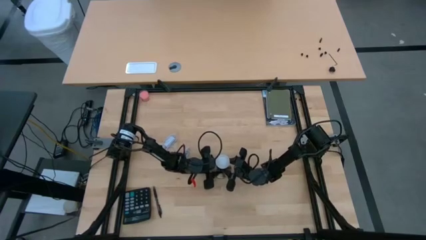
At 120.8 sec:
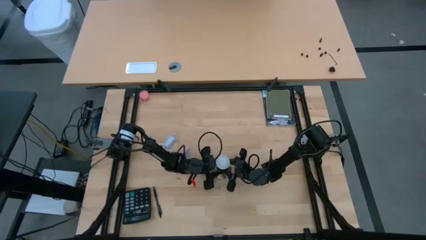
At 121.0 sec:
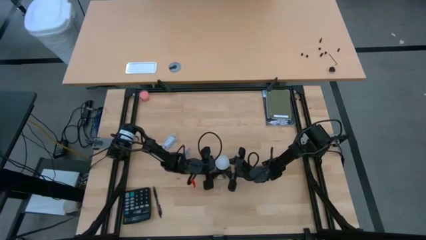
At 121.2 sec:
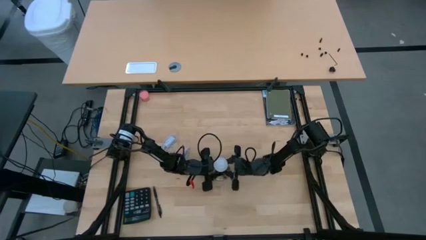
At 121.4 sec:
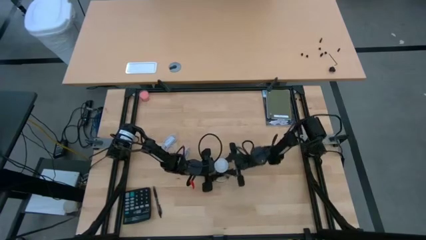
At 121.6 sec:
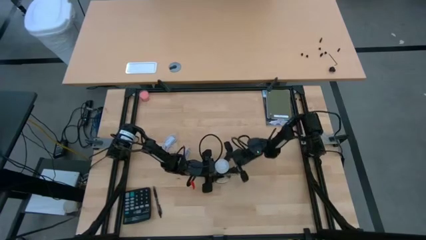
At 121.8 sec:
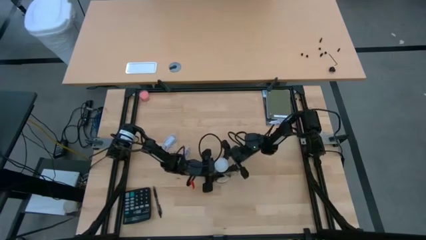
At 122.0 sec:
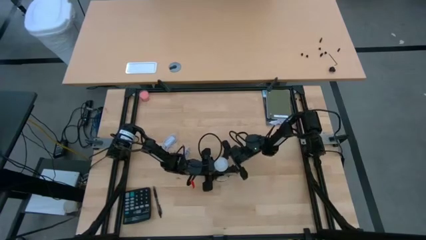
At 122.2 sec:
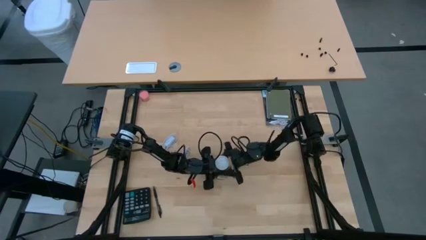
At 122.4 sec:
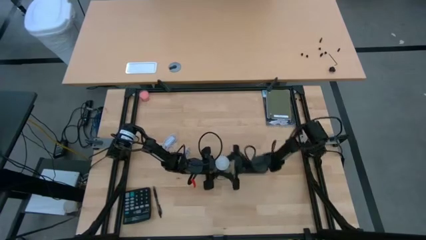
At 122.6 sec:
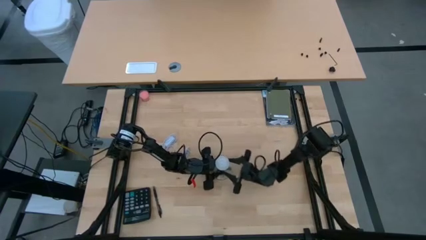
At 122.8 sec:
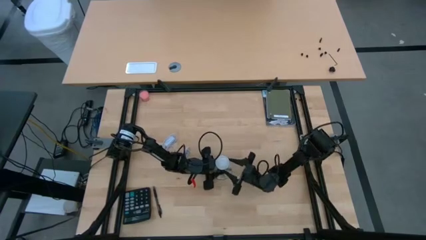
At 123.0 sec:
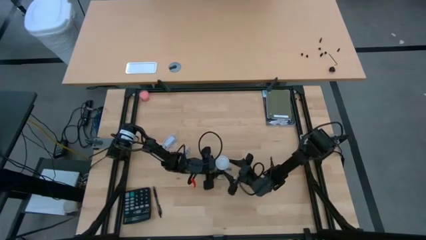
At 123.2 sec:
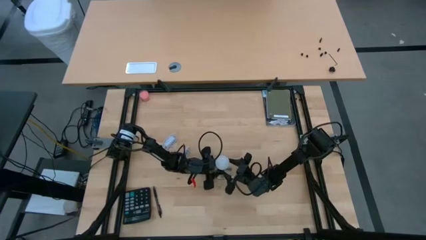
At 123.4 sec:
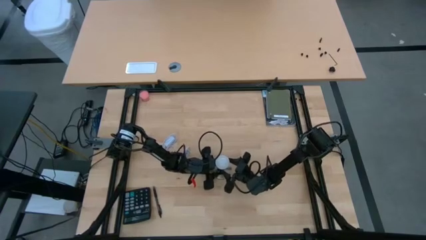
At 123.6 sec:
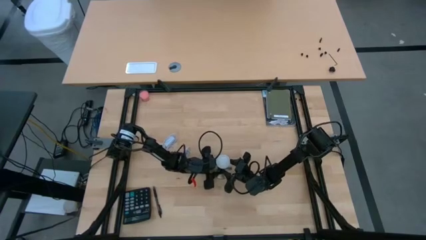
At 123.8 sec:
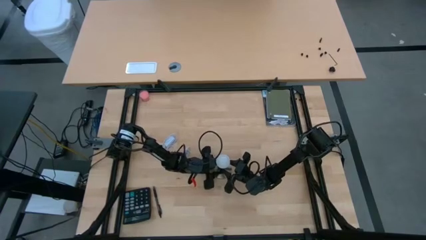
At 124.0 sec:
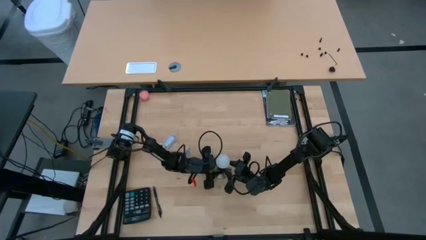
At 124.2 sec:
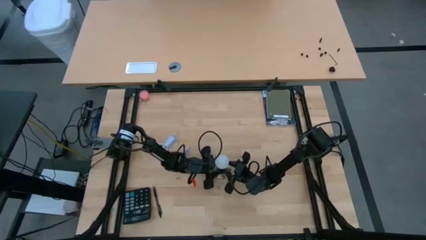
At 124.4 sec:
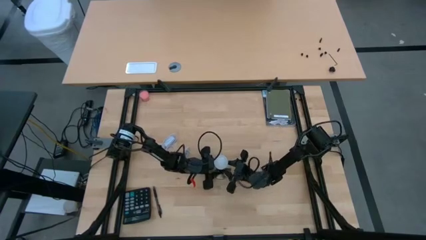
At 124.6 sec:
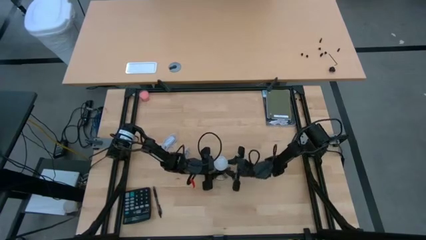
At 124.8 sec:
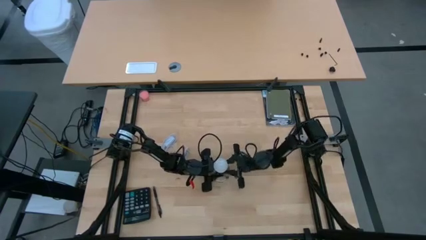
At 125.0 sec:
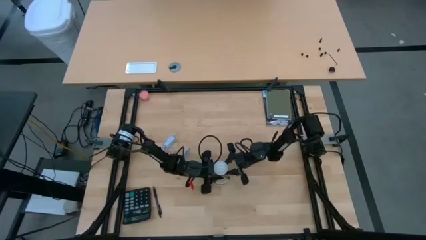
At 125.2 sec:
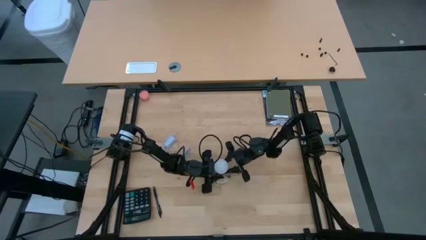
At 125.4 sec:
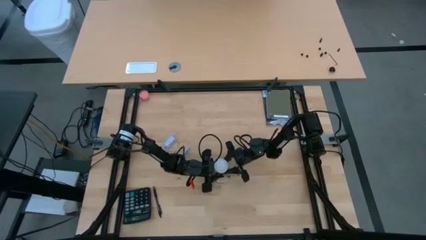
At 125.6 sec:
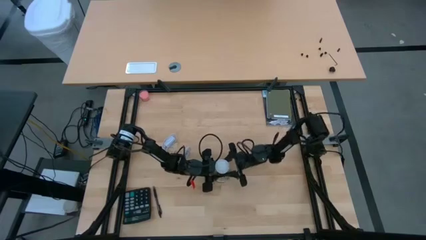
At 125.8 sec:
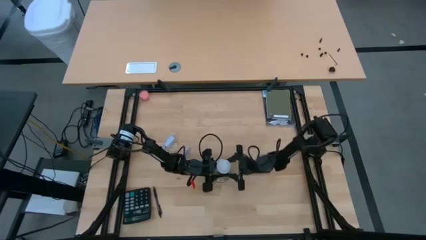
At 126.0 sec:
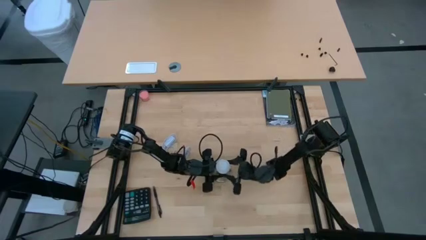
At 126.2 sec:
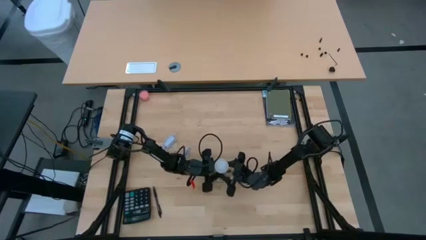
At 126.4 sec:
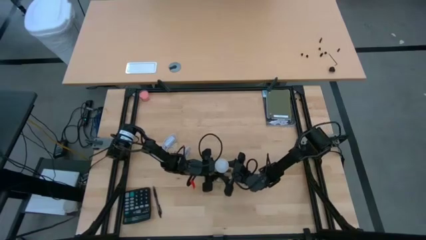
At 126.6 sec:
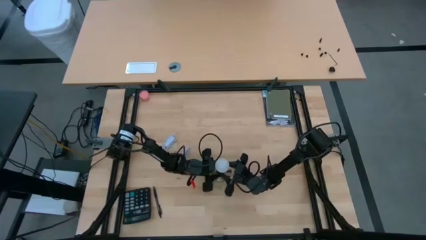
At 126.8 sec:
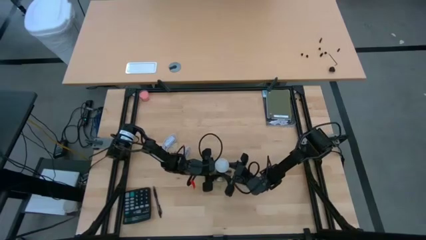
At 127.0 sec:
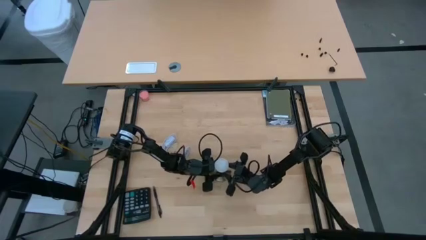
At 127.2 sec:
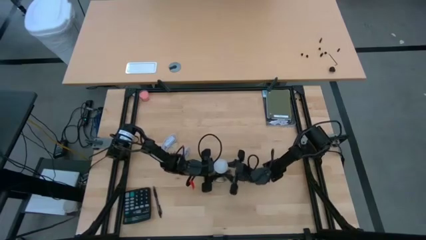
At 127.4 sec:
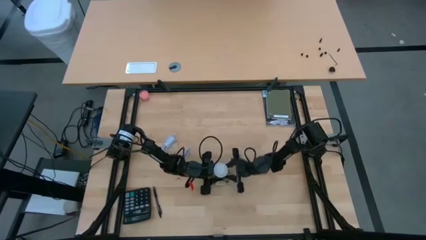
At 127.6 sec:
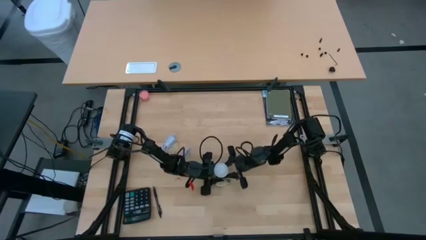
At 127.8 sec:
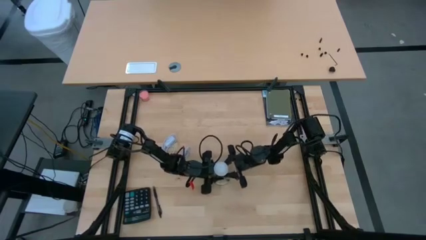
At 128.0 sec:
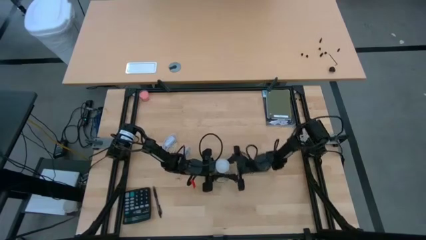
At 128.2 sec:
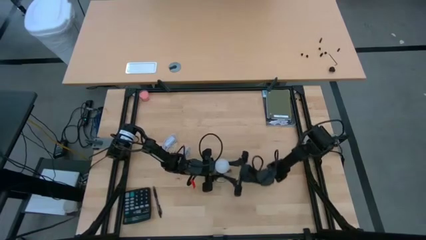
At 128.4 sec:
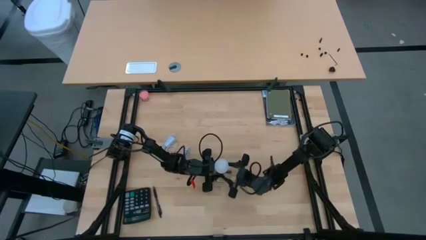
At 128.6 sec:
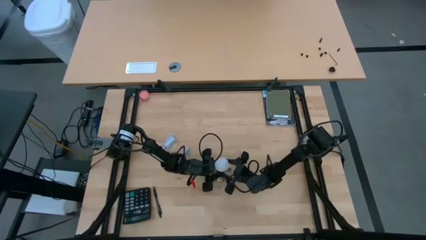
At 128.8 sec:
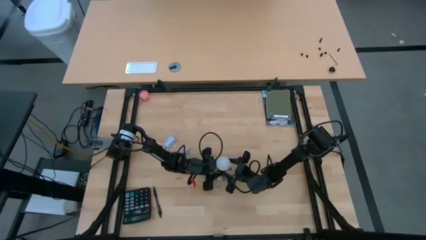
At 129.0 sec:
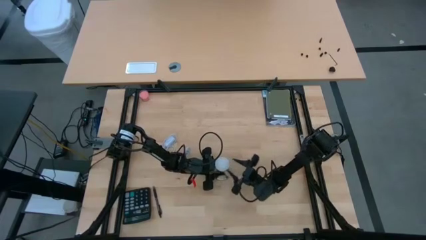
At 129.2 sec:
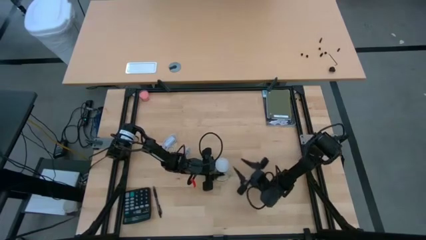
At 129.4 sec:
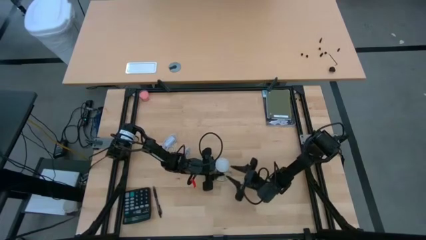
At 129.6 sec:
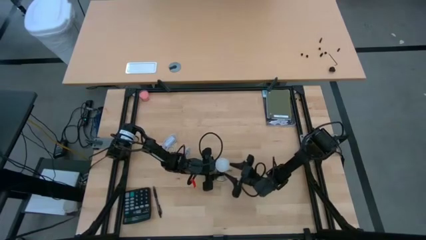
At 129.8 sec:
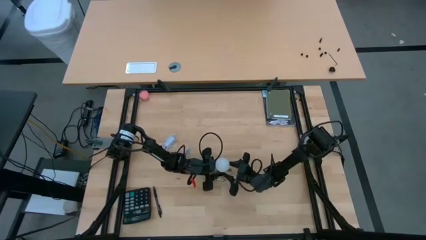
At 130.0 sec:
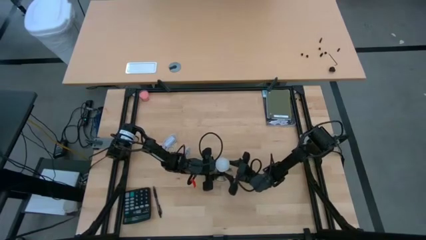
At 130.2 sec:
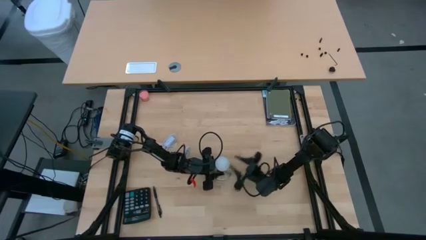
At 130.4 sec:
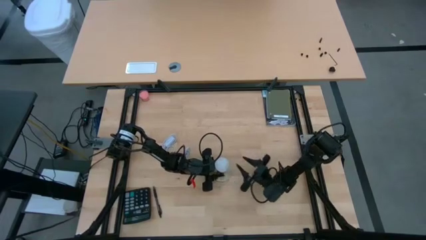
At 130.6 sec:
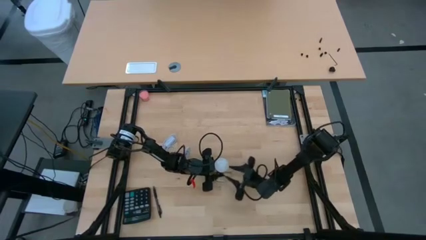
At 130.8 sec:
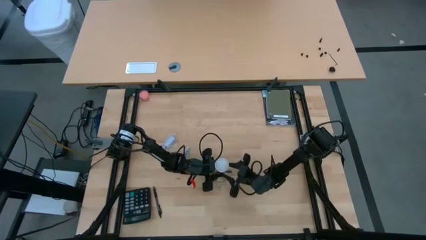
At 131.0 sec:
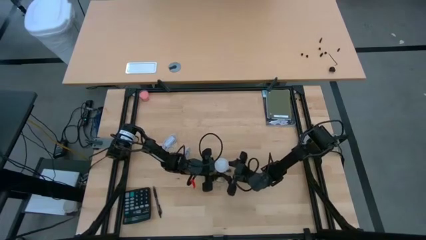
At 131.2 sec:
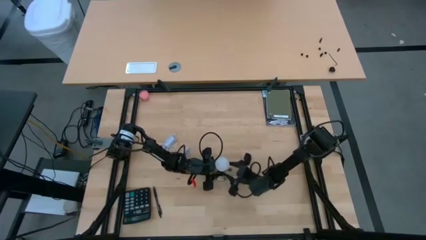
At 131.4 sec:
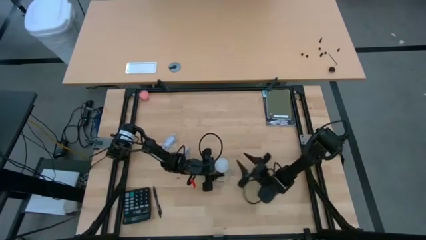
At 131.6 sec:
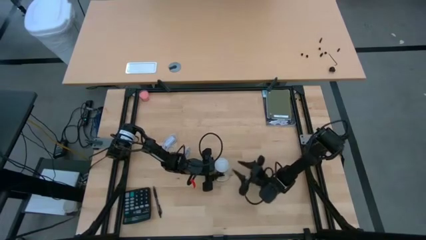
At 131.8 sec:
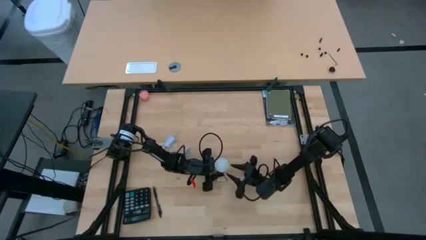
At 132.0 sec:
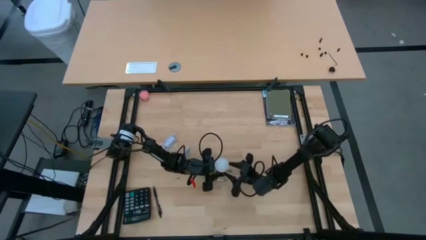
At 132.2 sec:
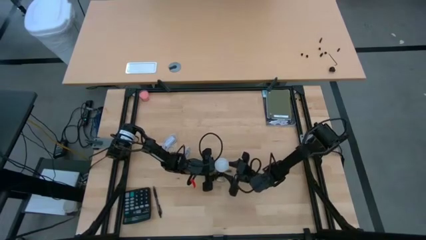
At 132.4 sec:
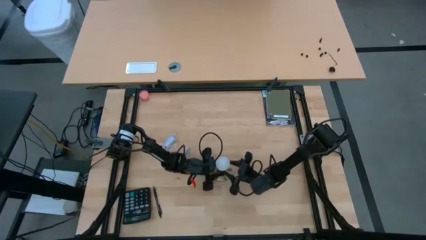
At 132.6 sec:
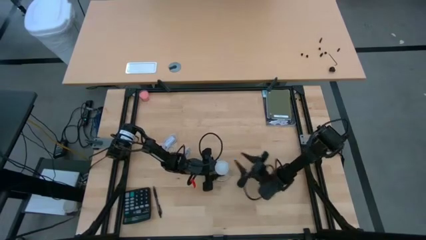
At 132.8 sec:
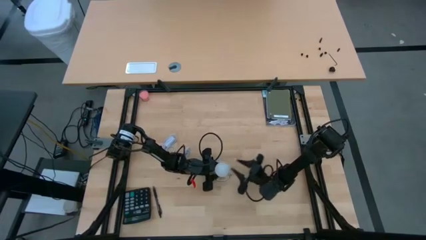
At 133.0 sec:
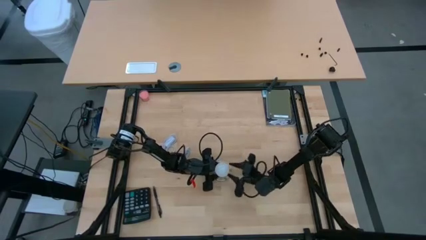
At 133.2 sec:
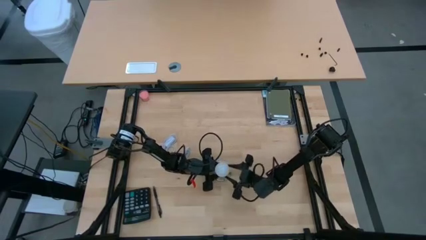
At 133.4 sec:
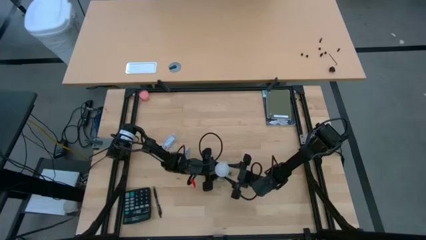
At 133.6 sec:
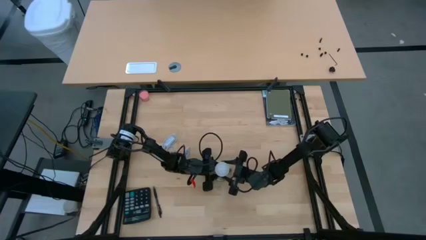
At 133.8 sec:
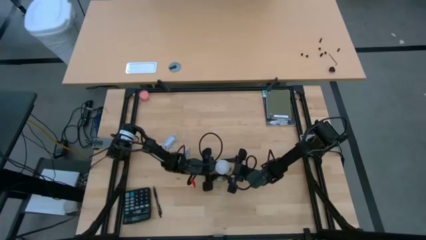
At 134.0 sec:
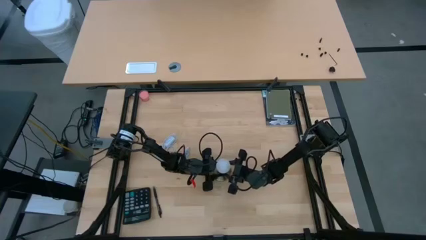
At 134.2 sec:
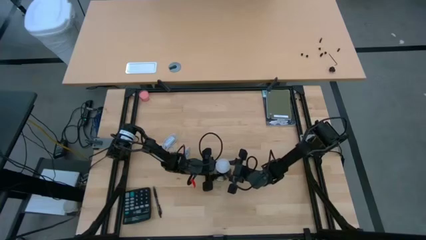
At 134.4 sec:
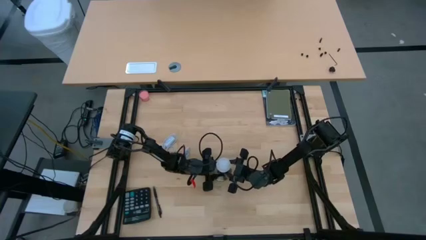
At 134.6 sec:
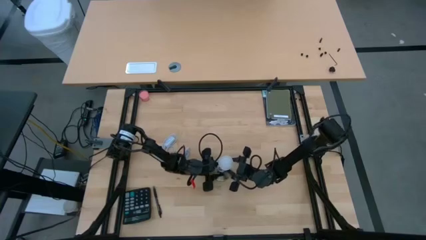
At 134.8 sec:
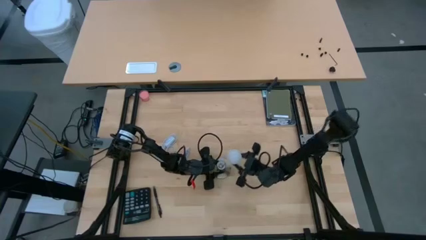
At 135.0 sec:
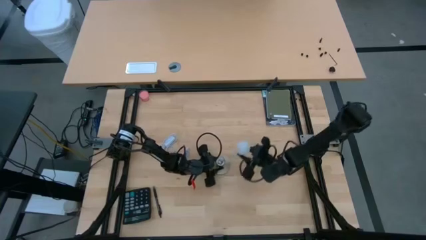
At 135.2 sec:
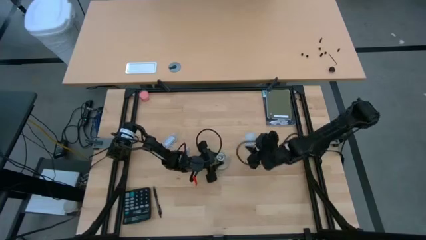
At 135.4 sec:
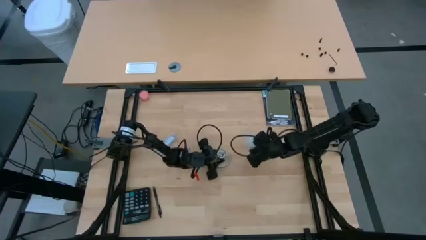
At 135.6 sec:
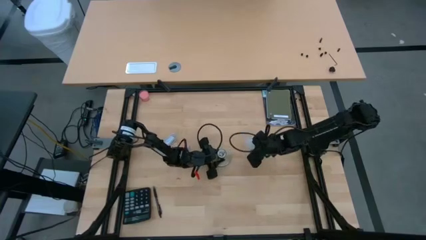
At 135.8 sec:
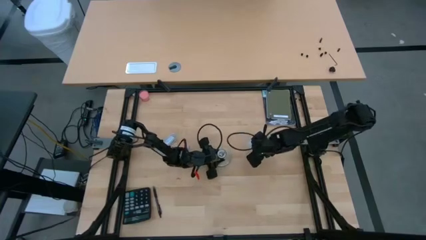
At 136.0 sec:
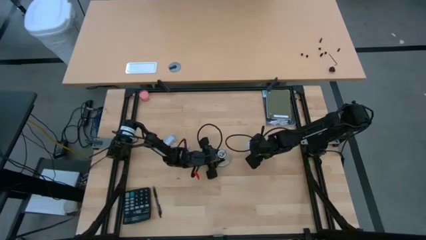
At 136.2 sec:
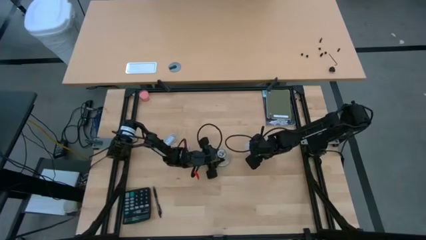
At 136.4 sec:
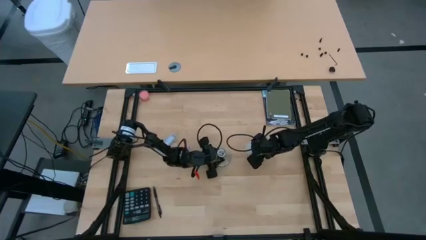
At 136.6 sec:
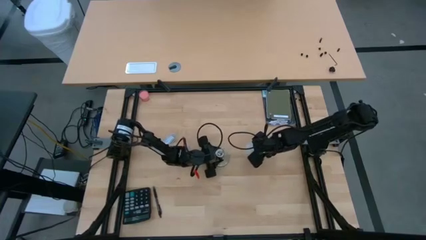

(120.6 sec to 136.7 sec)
Task: Screw lightbulb
Remove the lightbulb from the lamp
